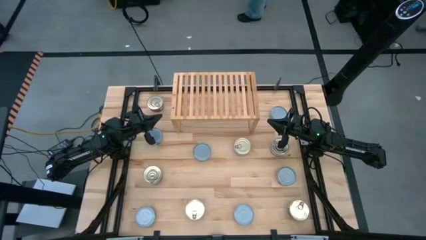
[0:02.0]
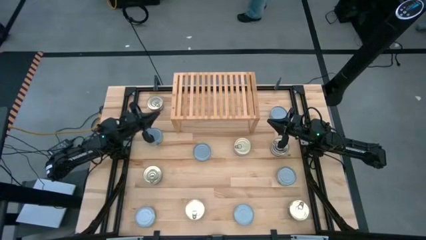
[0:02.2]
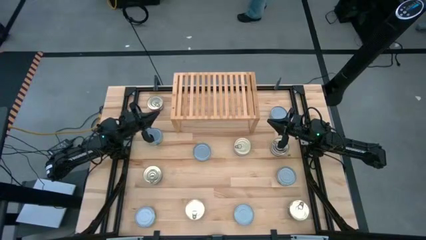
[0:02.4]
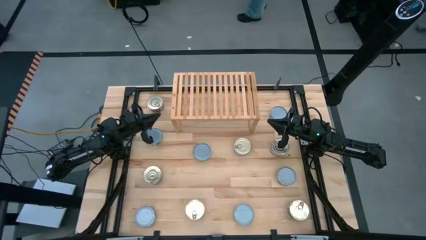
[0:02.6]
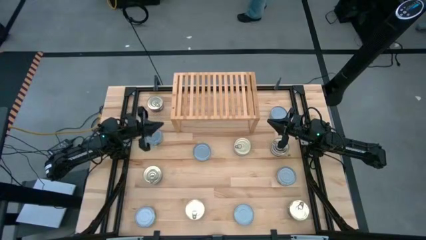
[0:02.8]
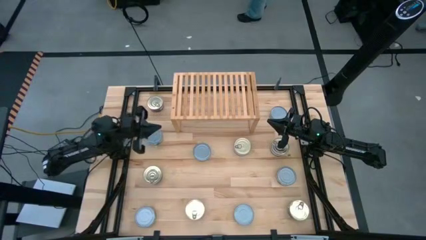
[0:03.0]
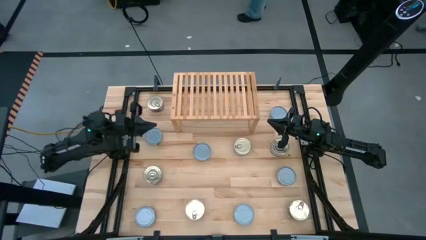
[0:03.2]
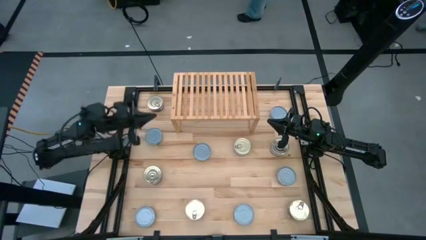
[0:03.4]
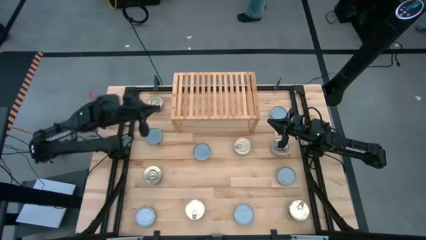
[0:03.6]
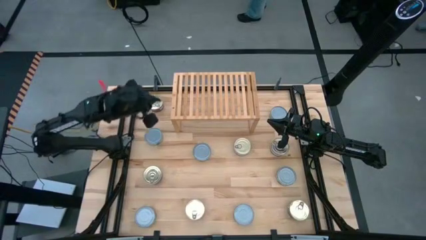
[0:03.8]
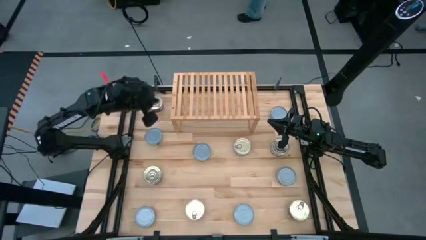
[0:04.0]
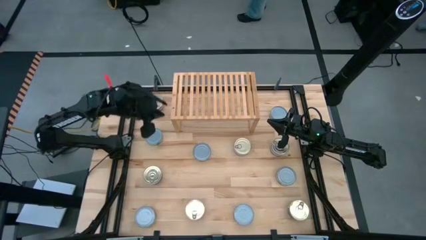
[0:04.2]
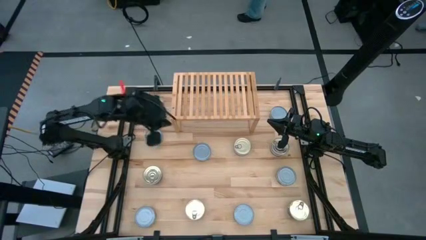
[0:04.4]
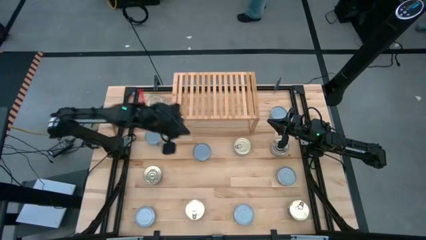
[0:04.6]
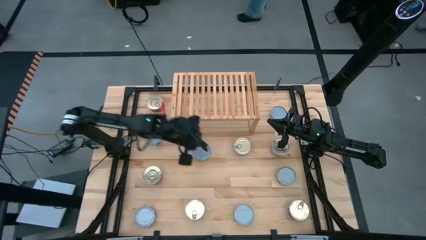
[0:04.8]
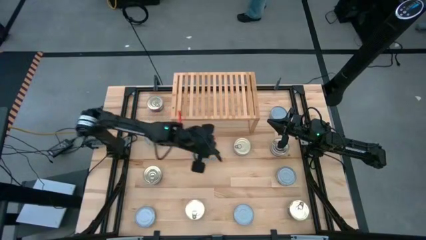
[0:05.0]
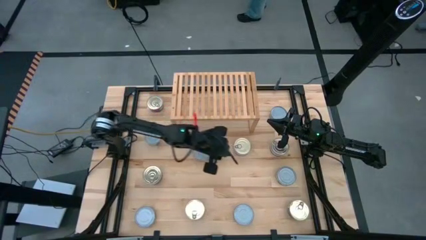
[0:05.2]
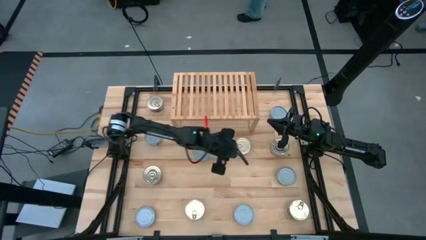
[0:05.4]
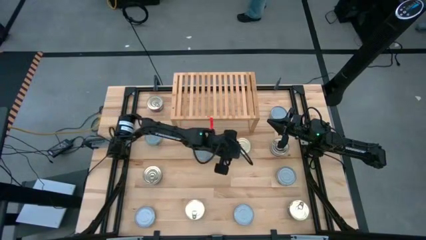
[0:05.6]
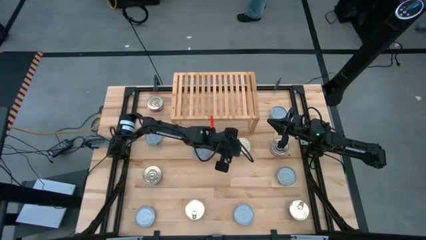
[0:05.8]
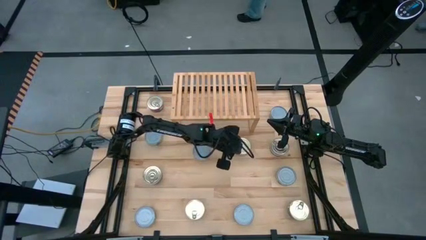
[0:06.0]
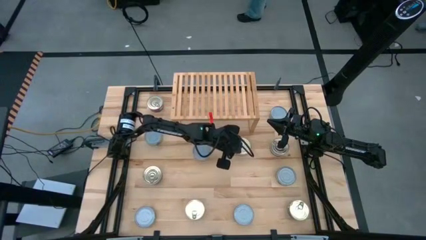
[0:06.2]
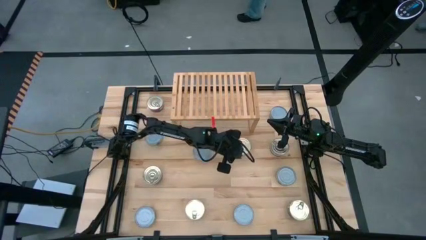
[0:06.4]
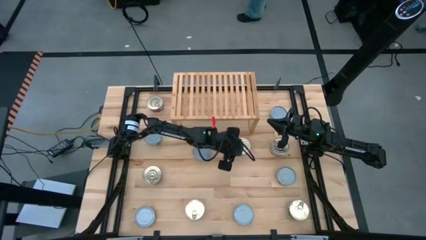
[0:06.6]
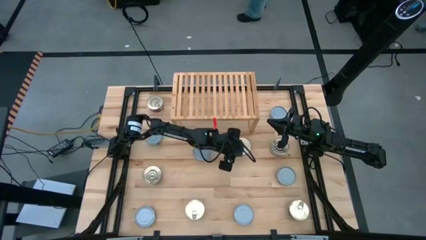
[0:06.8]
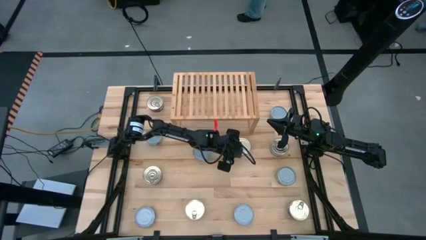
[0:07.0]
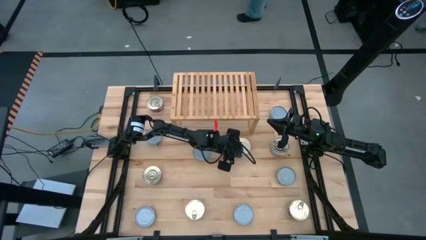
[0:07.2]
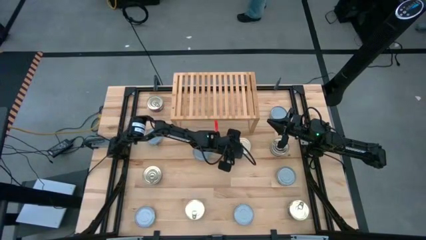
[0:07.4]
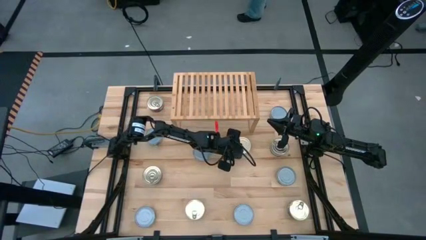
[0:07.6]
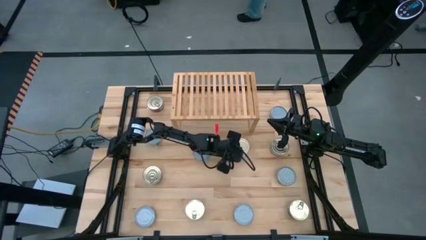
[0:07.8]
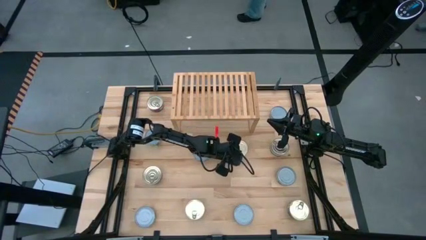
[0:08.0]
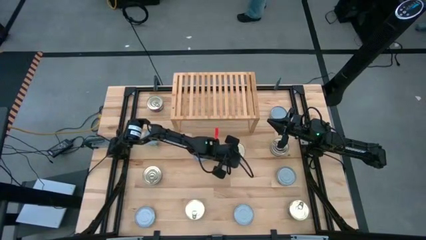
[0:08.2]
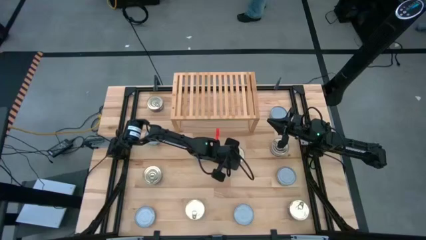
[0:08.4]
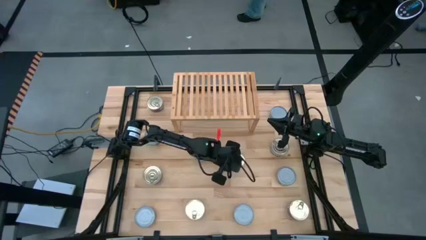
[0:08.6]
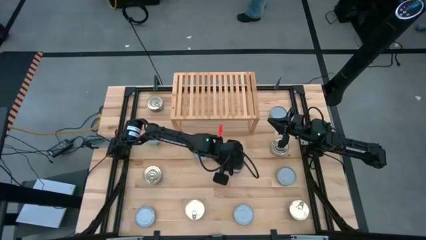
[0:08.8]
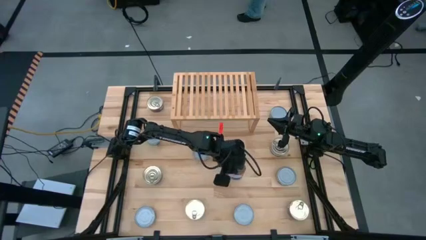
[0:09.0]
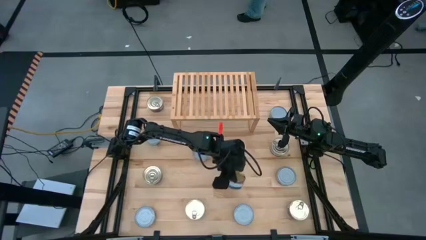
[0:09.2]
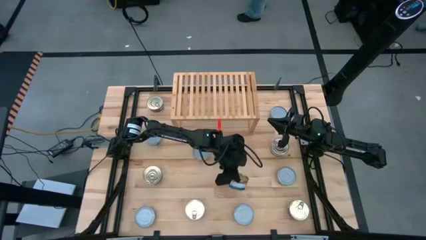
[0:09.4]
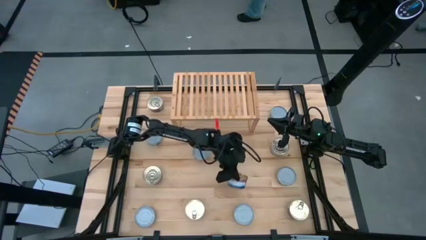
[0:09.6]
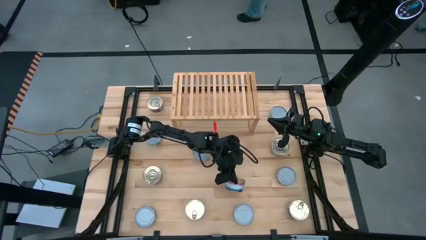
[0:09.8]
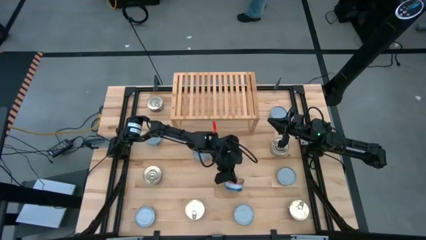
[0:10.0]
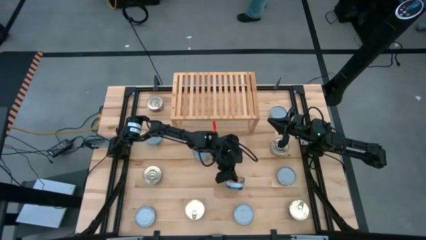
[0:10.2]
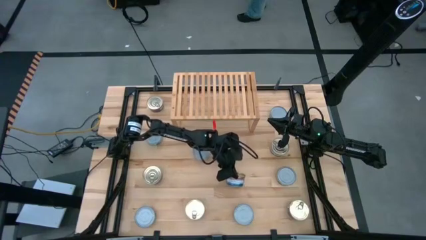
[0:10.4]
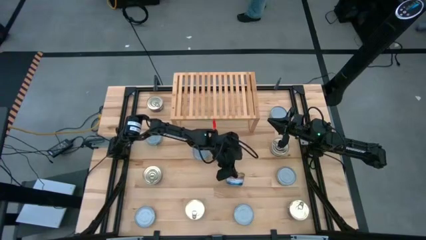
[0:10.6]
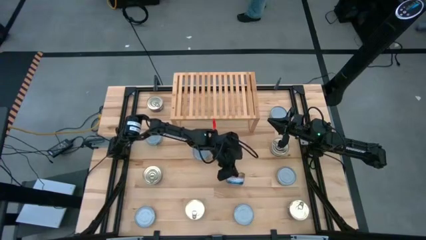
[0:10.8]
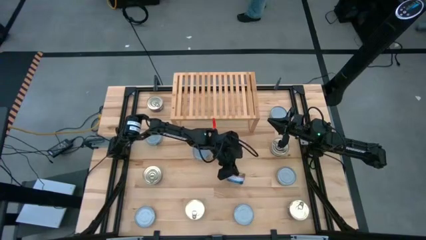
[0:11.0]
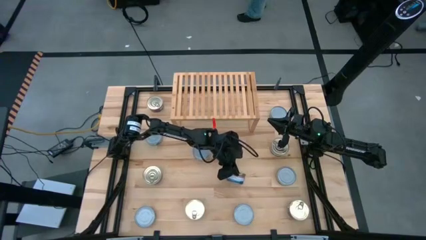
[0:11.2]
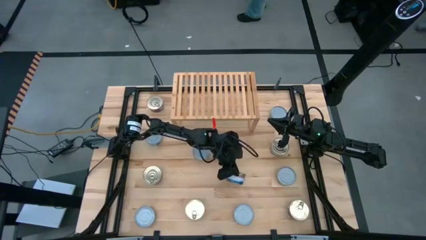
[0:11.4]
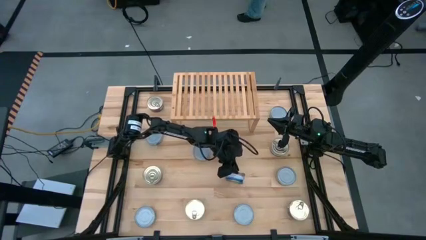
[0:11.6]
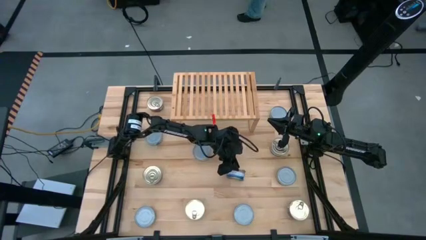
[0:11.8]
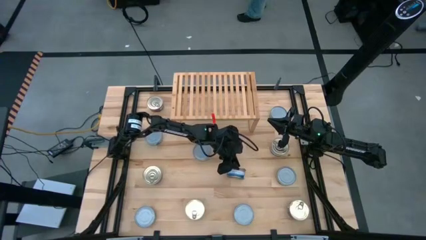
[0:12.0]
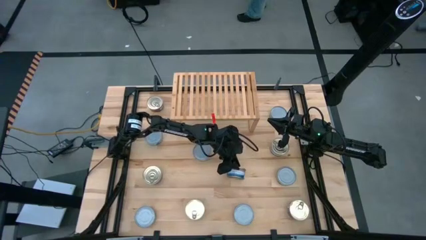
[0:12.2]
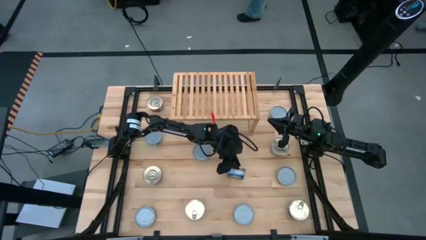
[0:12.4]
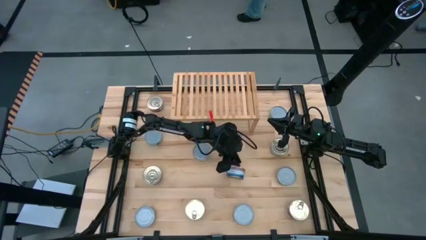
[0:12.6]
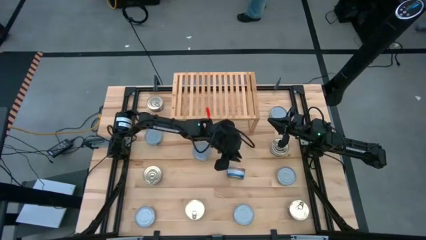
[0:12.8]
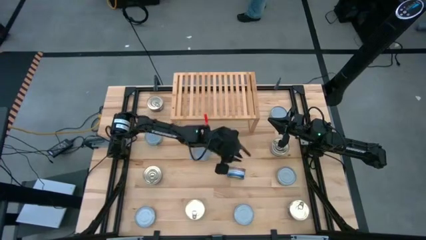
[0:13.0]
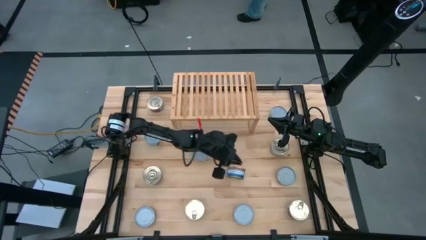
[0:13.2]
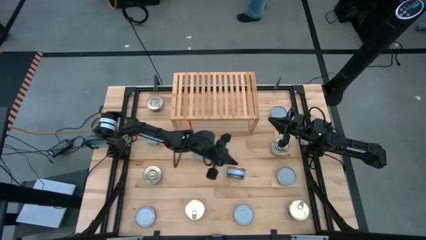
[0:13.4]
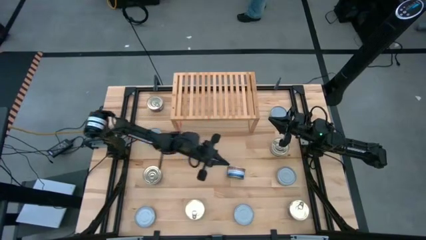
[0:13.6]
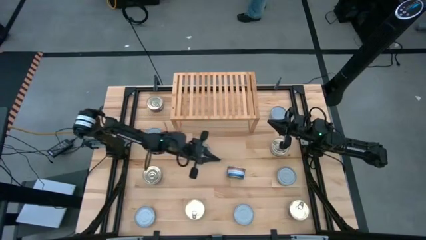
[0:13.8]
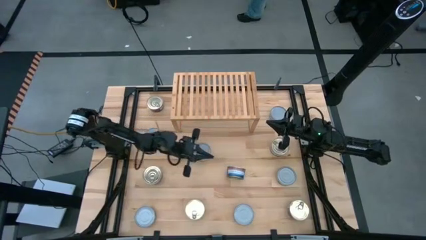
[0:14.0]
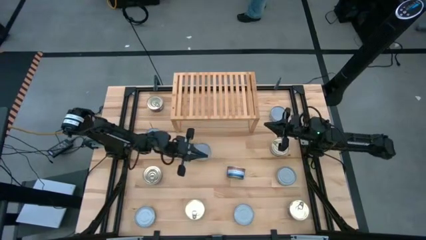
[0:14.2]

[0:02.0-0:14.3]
Task: Stack canned seafood by type on shelf
Put the blue tuna can on the shelf
